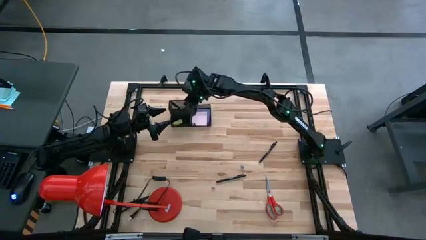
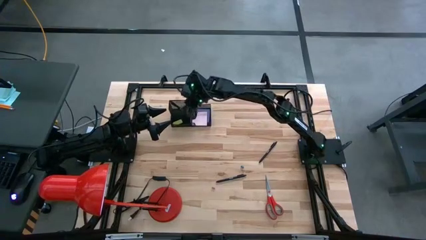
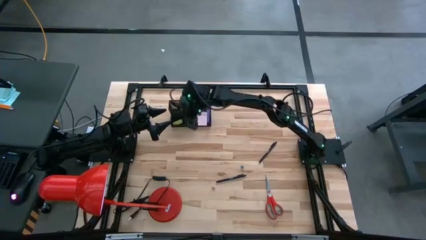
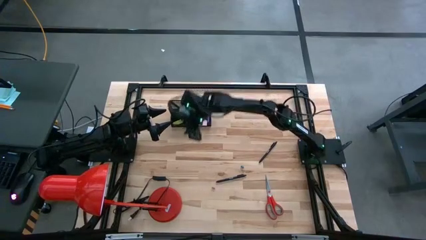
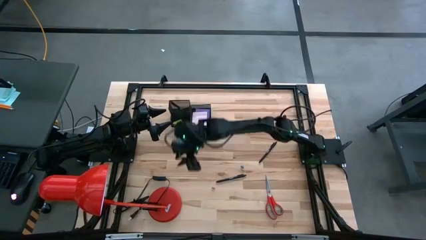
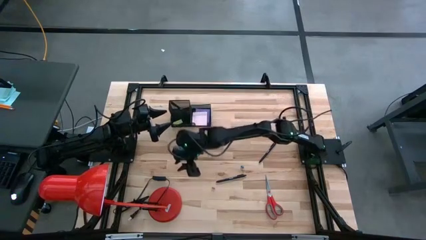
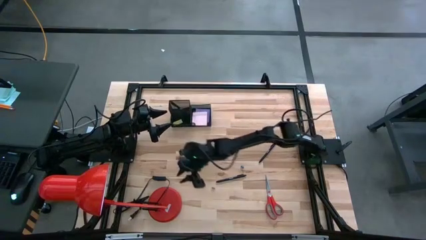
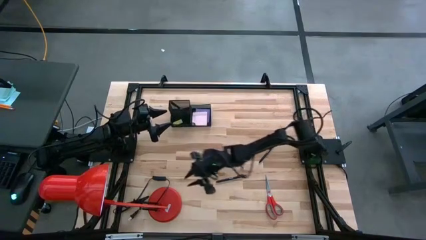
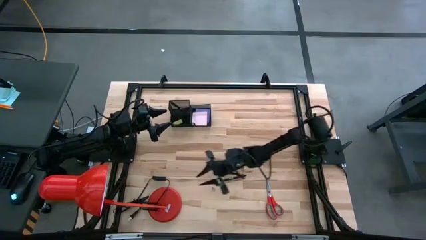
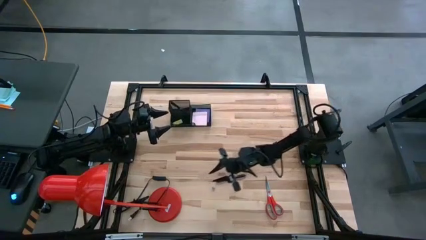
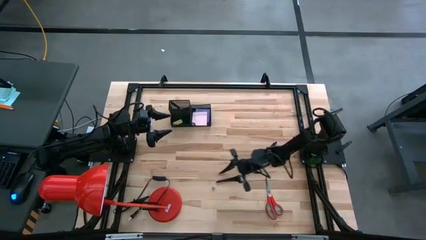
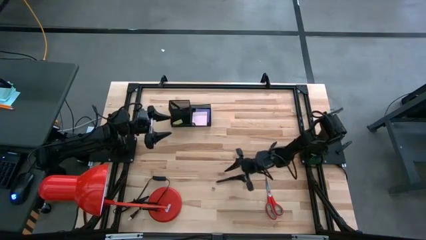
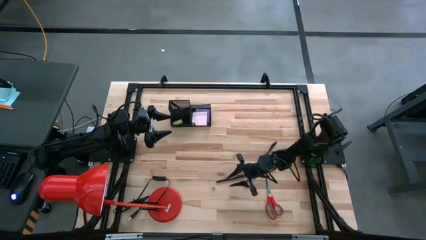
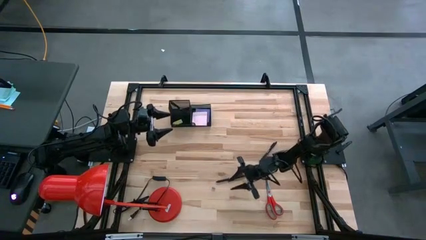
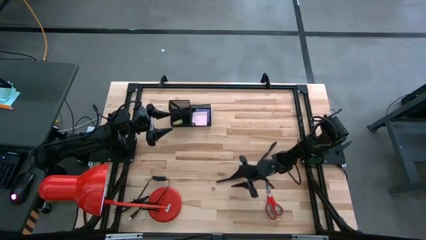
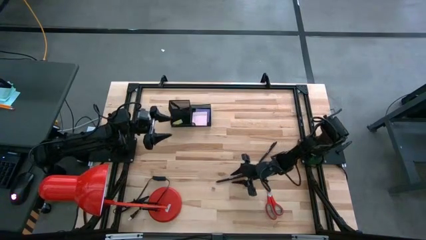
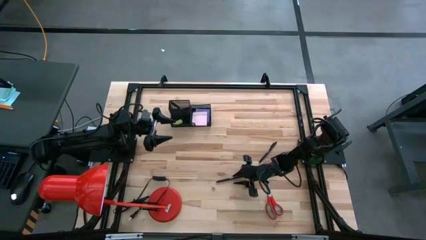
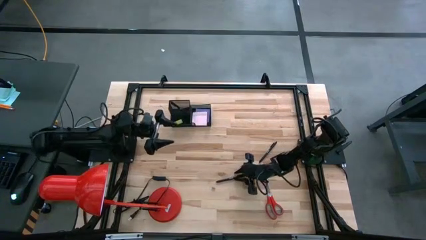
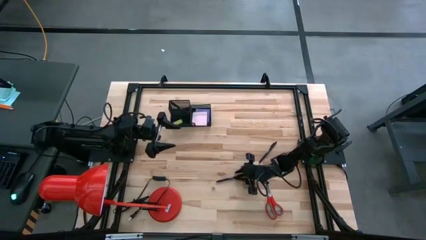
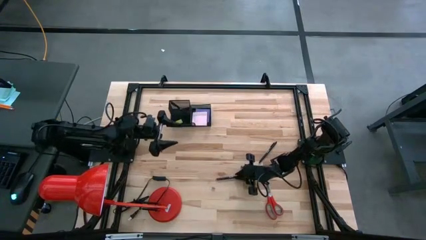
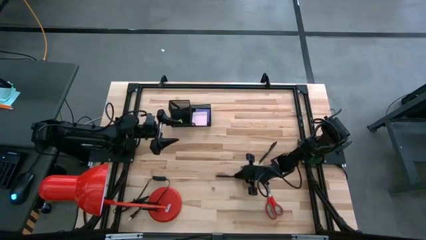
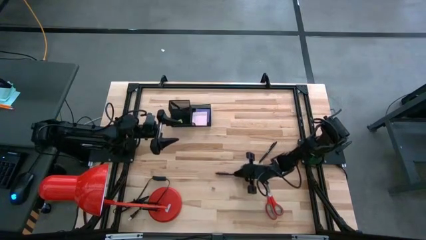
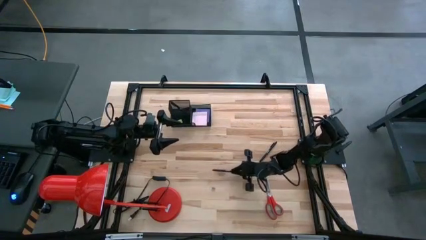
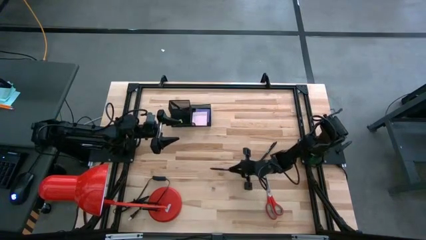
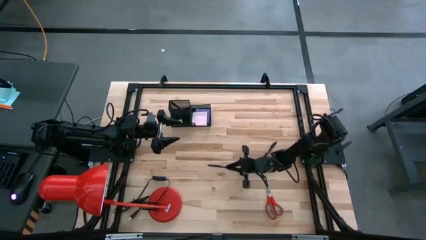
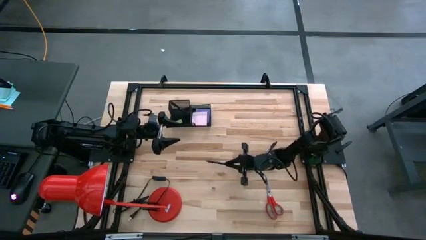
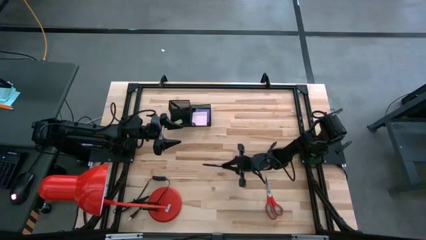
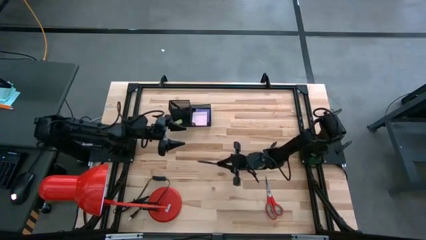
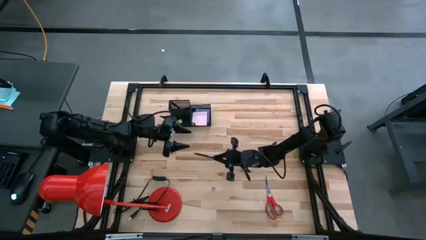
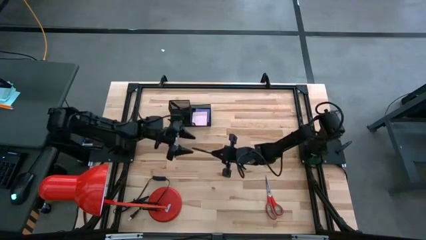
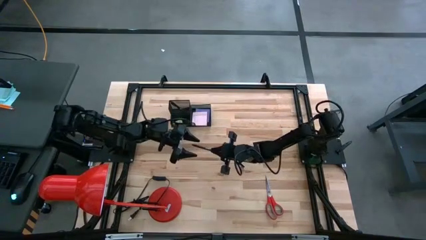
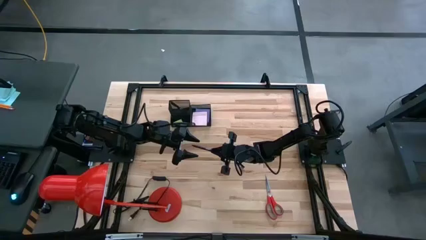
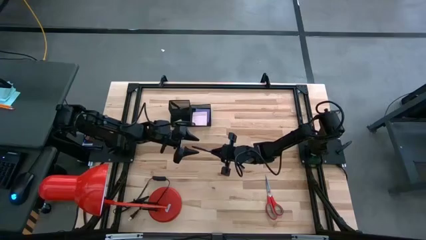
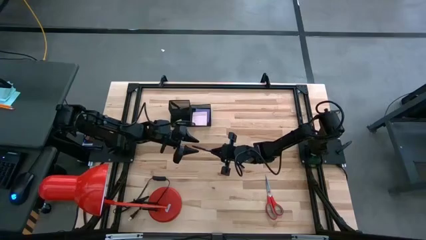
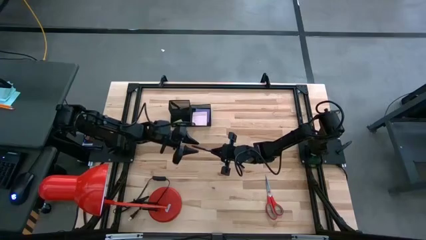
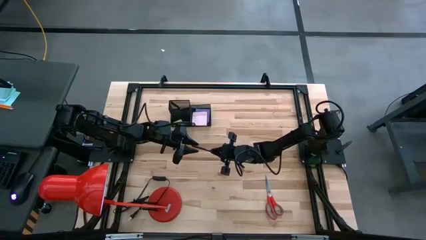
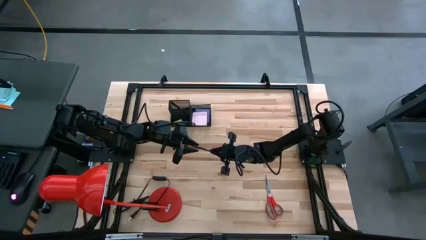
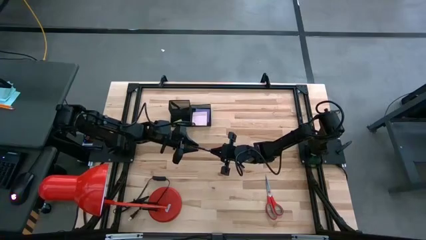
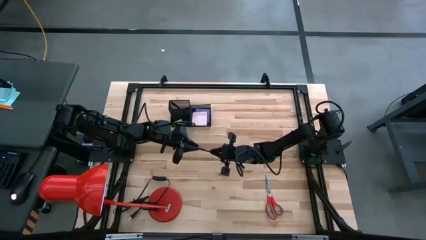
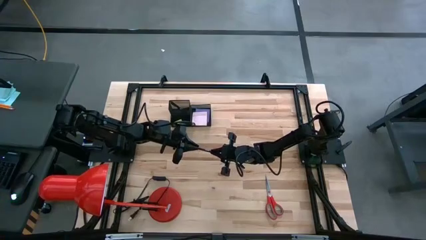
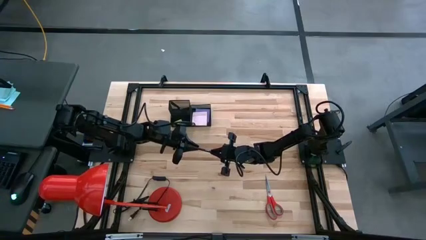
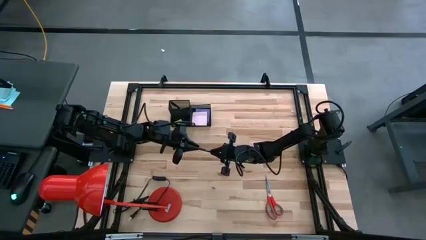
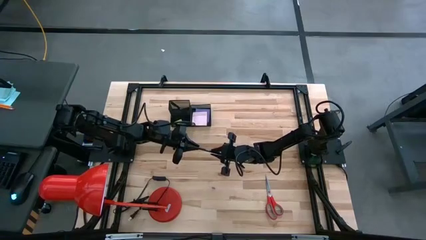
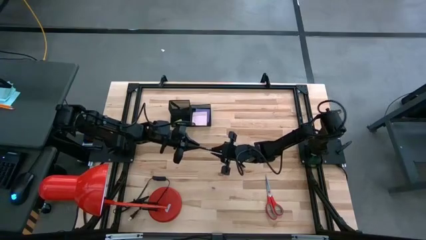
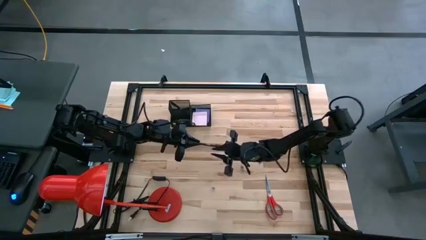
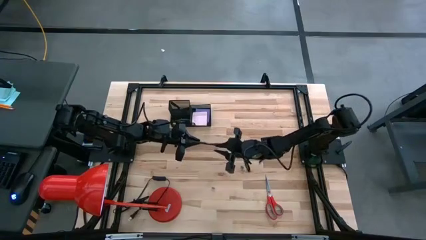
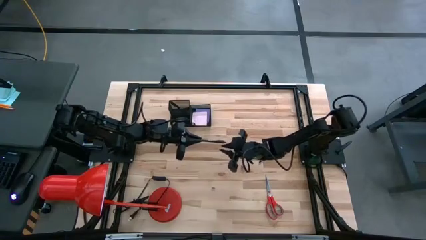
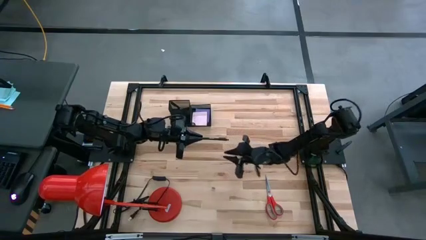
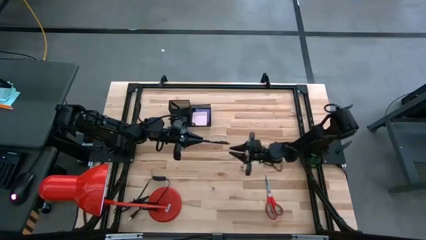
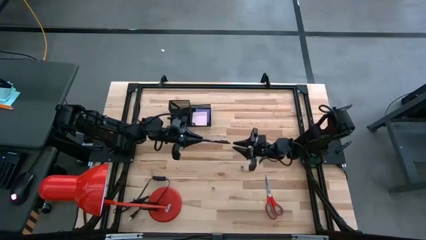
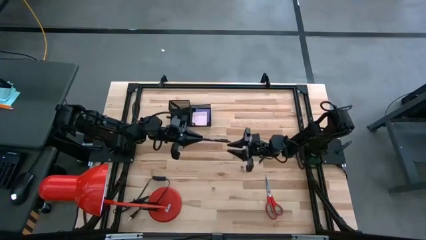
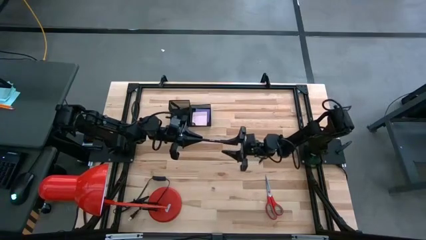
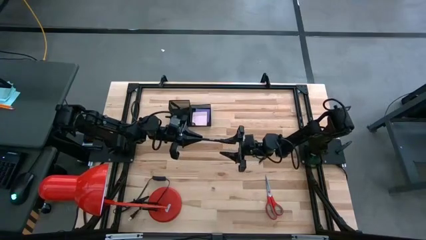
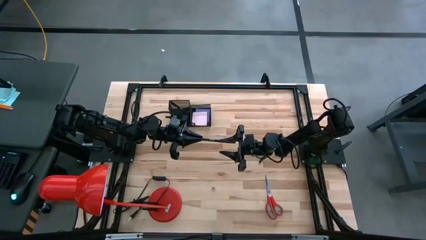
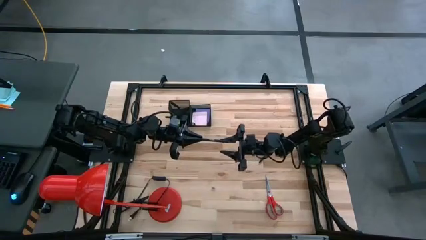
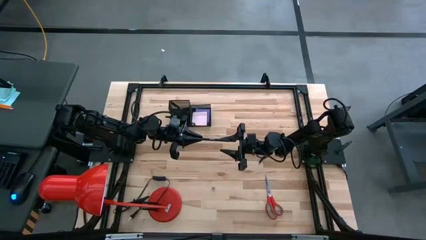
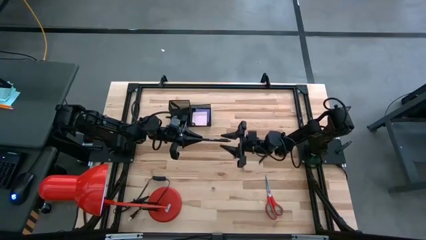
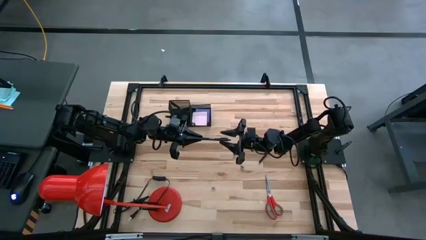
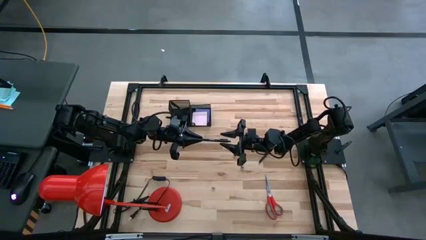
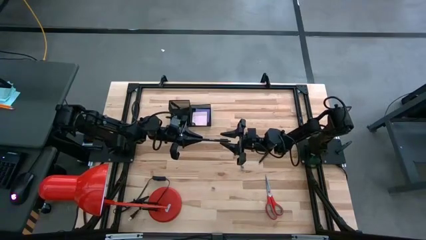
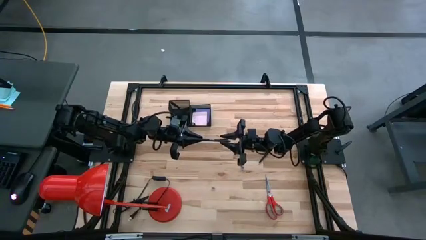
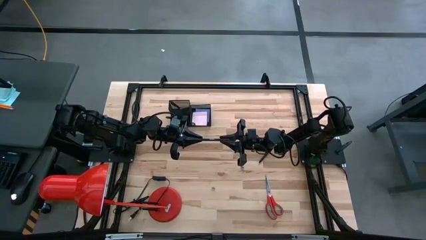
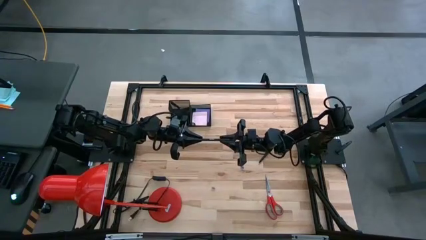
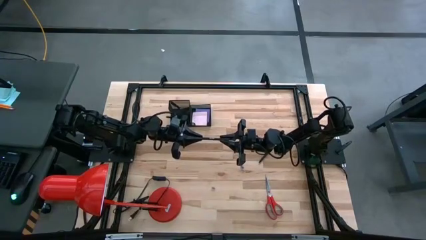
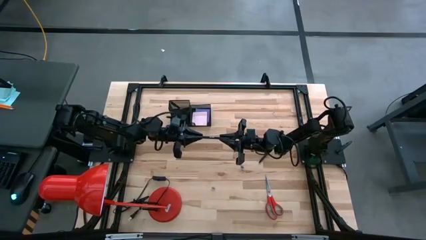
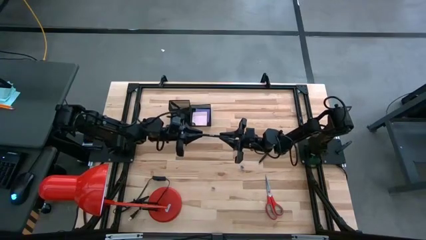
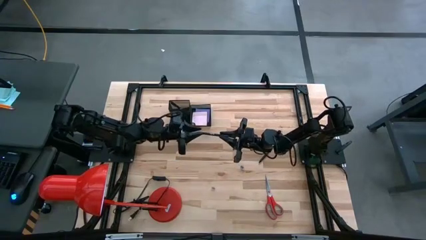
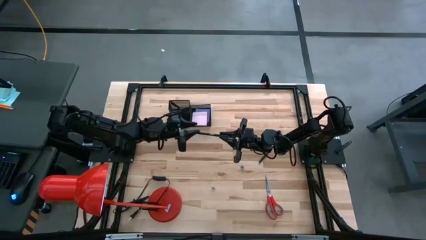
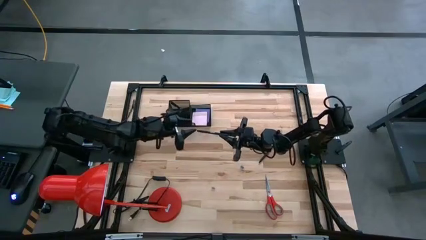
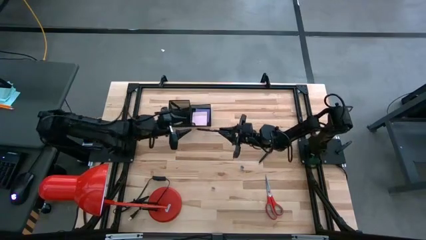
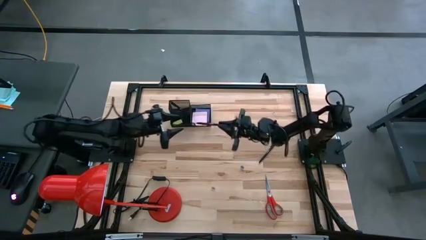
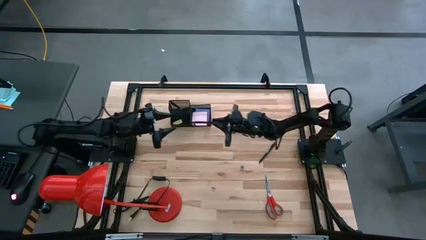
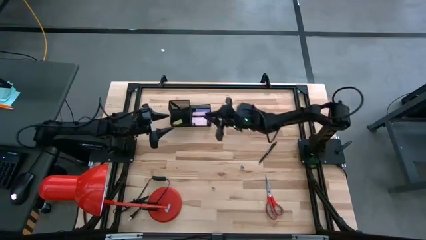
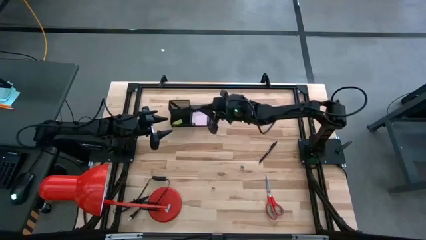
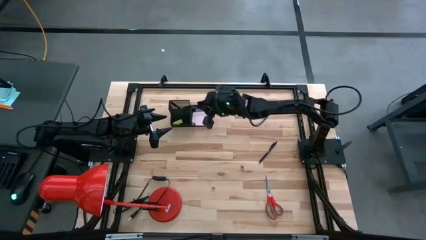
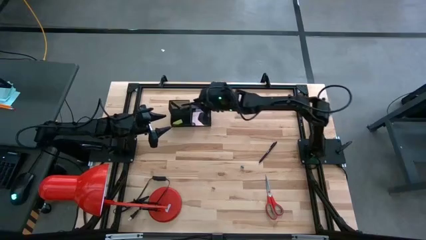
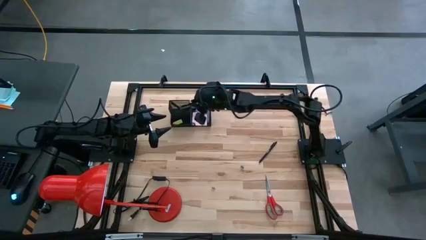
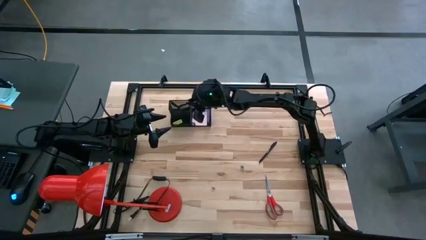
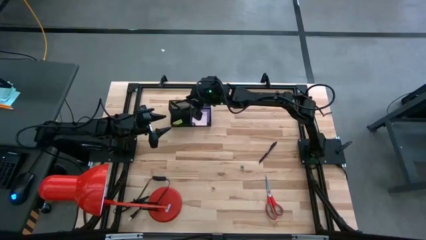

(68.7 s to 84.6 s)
Task: Pick and place office supplies into organizer
Put the black pen into the desk organizer

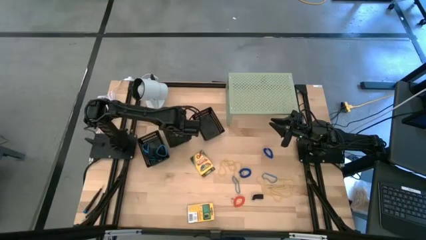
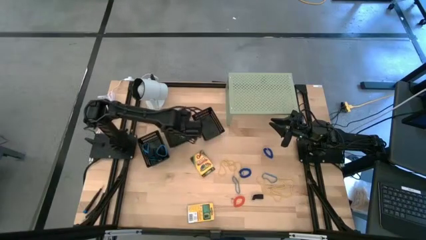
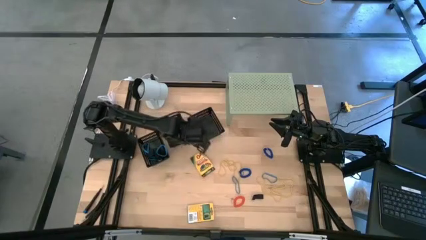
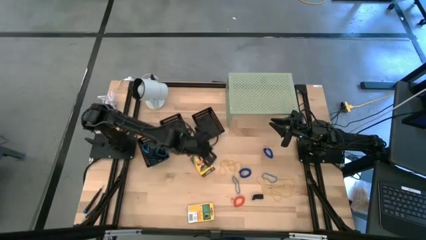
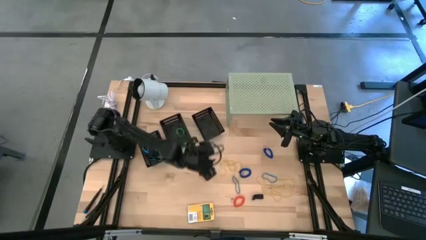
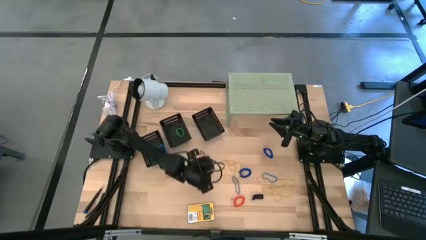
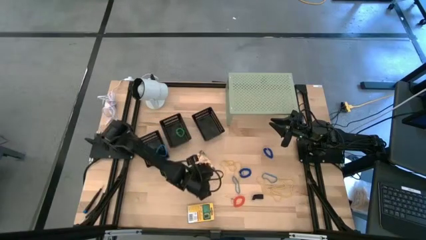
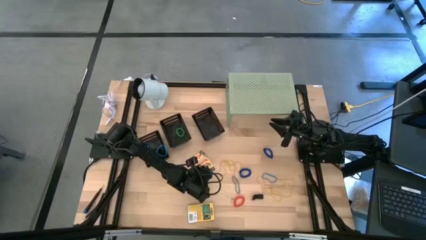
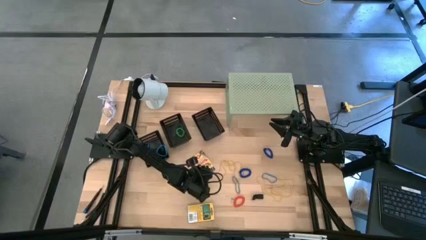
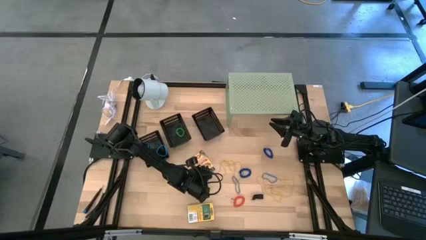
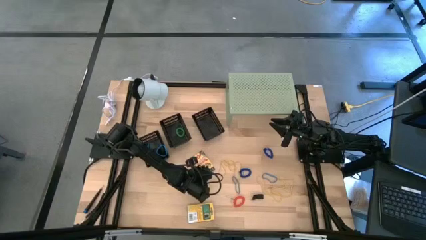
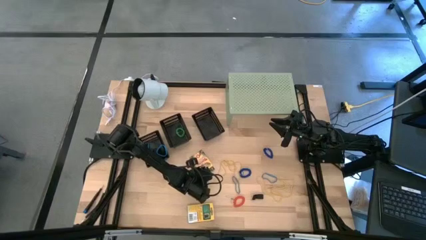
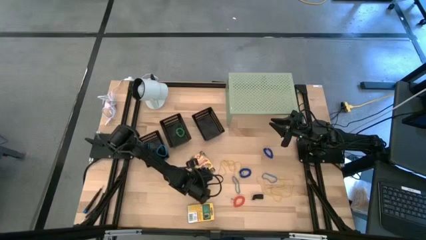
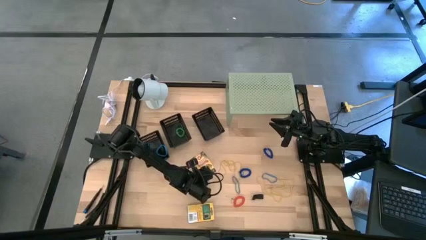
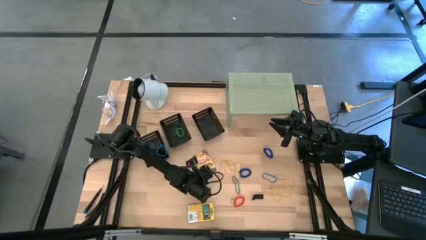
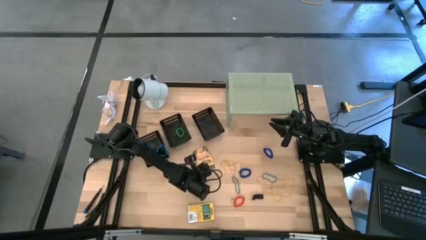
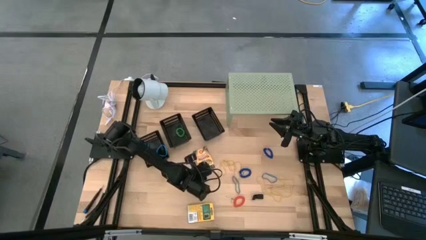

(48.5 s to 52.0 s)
Task: Pick & Place Office Desk Supplies
Put the crayon pack into the right black basket
